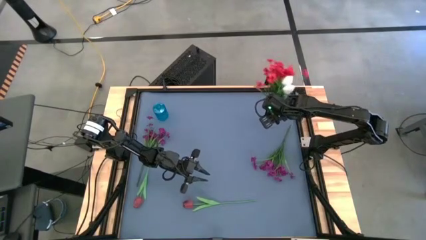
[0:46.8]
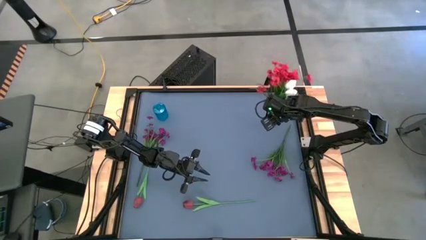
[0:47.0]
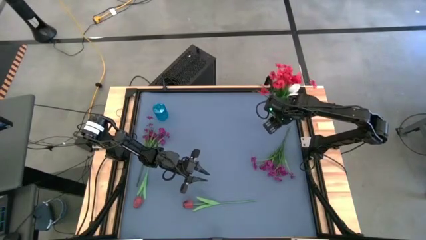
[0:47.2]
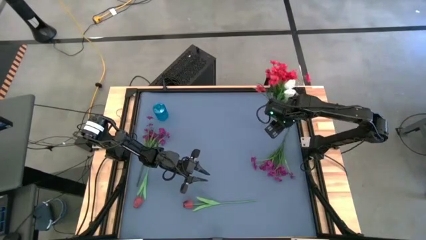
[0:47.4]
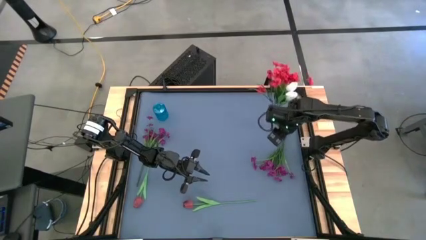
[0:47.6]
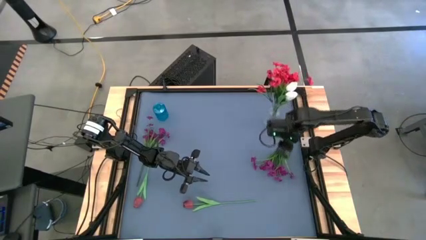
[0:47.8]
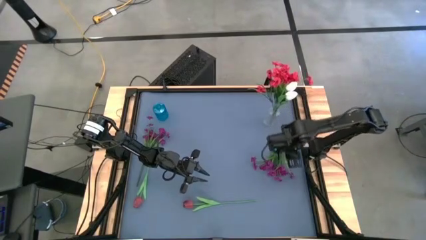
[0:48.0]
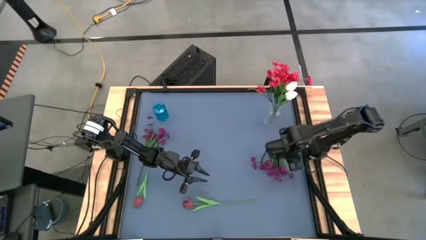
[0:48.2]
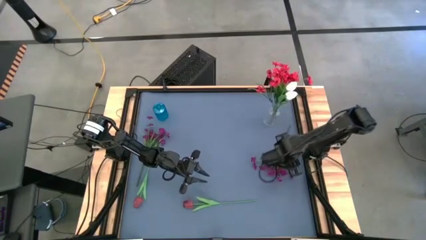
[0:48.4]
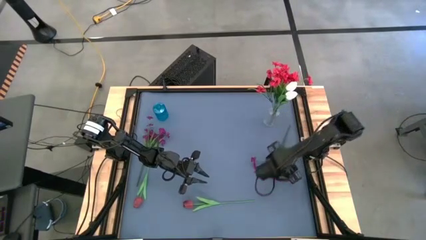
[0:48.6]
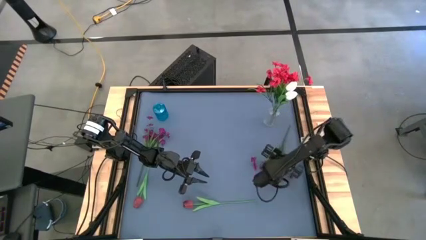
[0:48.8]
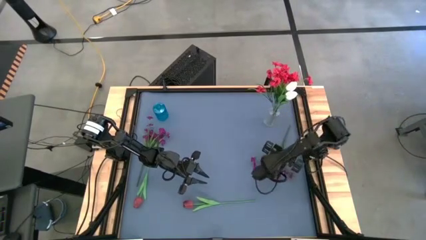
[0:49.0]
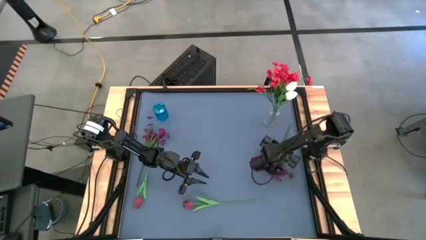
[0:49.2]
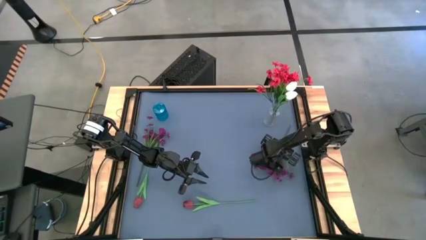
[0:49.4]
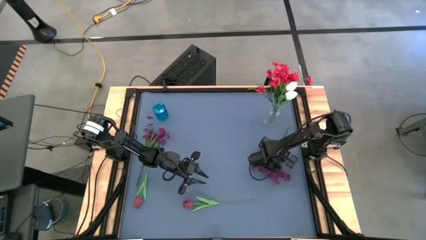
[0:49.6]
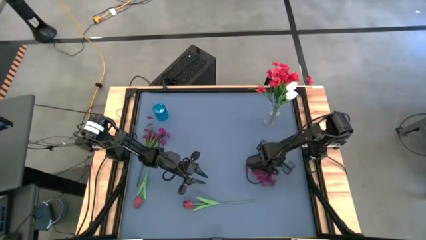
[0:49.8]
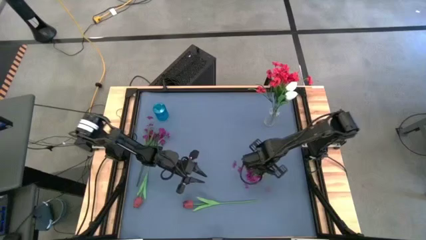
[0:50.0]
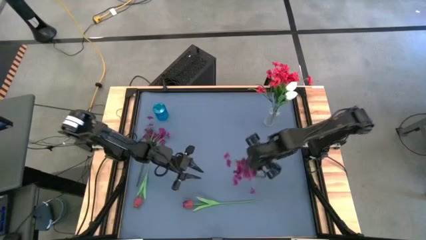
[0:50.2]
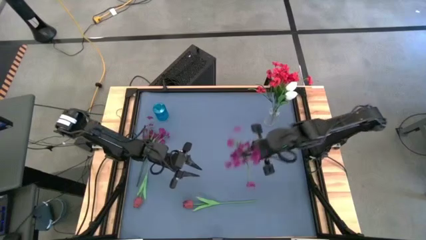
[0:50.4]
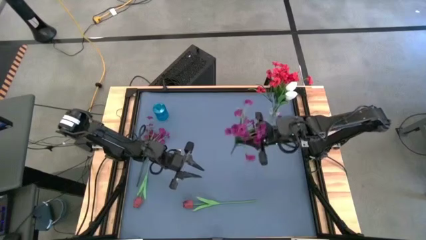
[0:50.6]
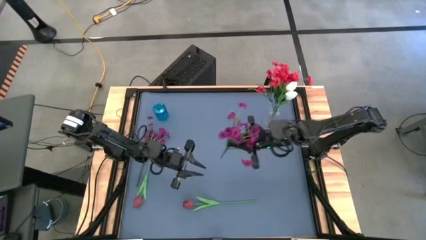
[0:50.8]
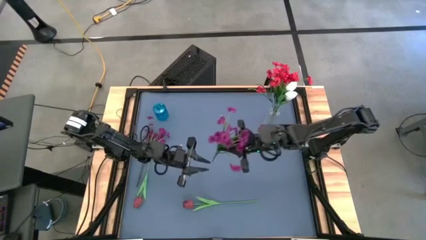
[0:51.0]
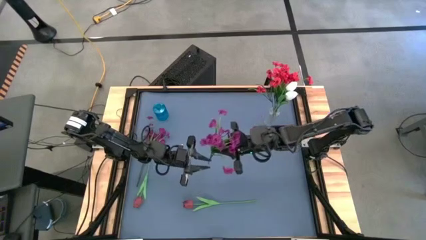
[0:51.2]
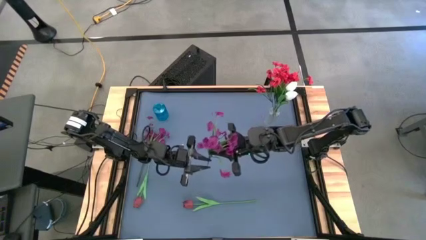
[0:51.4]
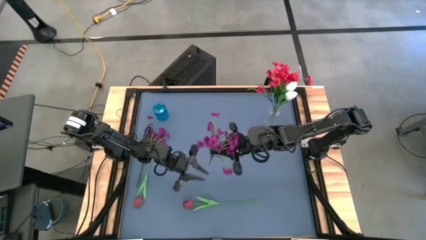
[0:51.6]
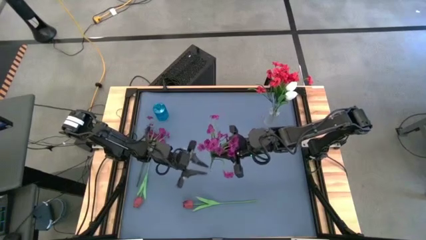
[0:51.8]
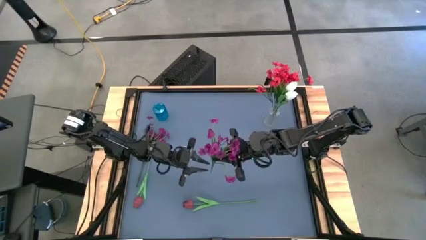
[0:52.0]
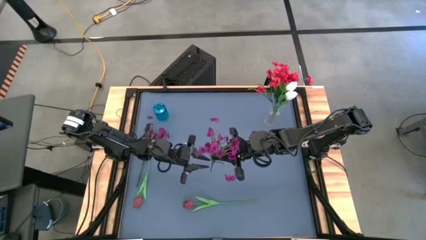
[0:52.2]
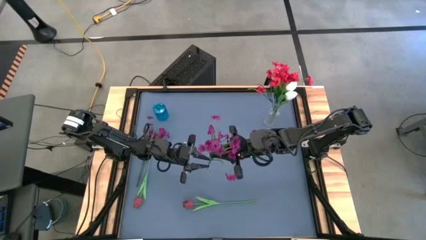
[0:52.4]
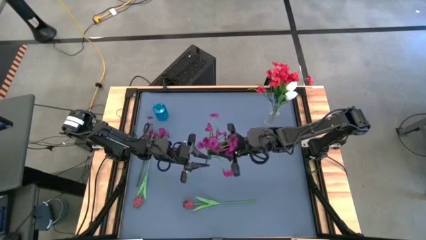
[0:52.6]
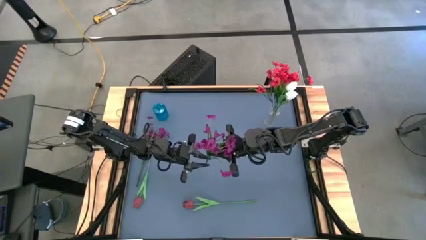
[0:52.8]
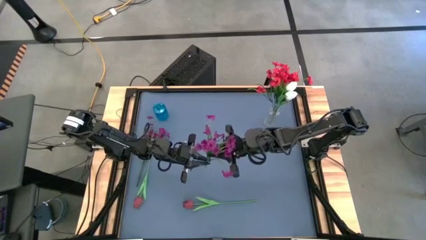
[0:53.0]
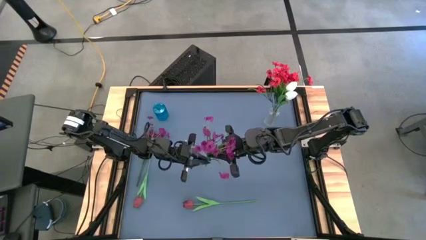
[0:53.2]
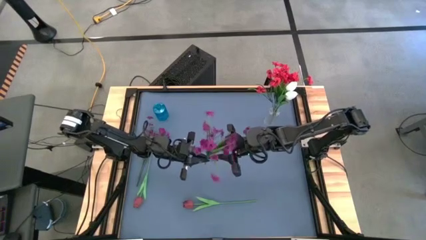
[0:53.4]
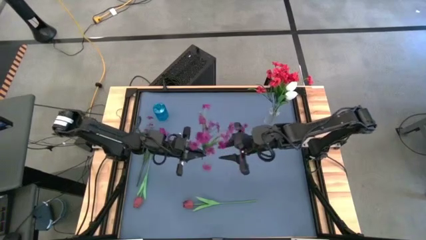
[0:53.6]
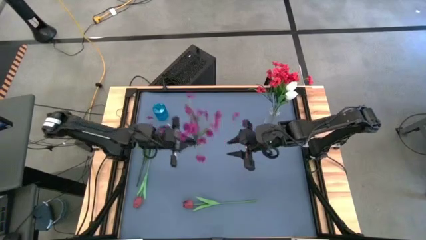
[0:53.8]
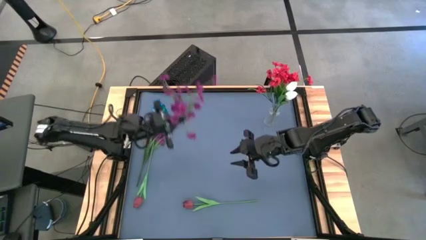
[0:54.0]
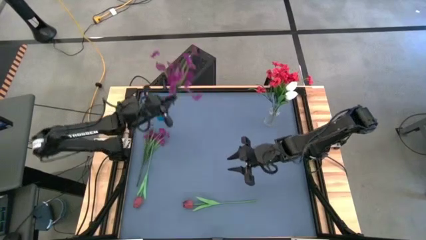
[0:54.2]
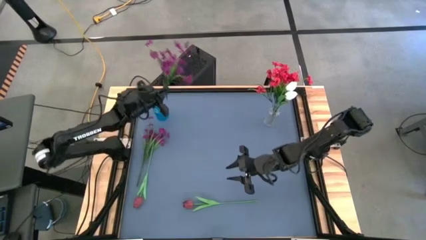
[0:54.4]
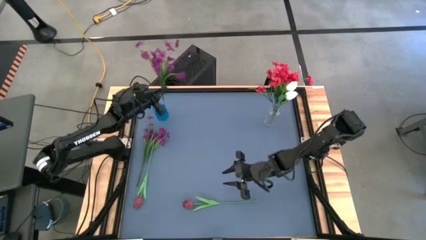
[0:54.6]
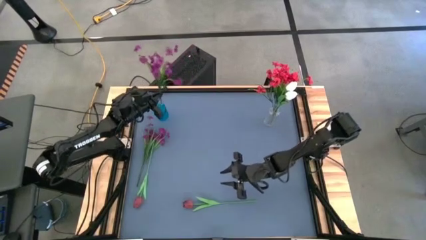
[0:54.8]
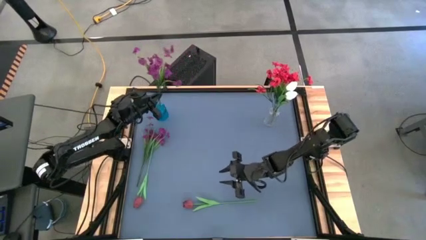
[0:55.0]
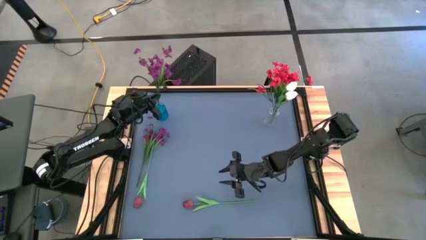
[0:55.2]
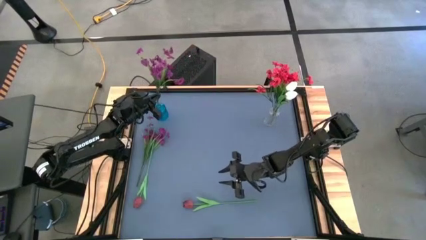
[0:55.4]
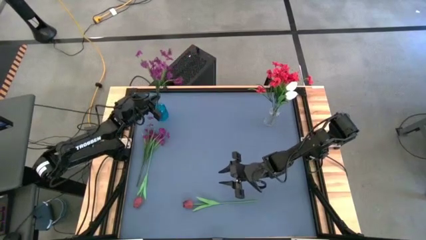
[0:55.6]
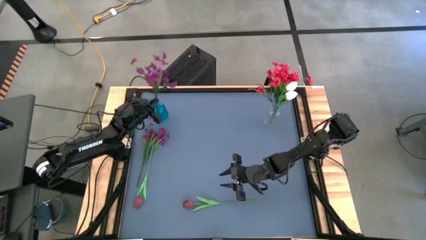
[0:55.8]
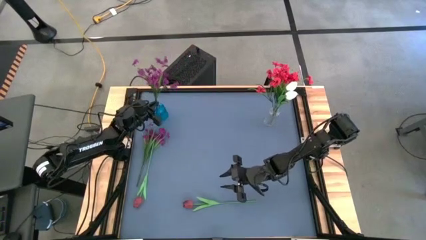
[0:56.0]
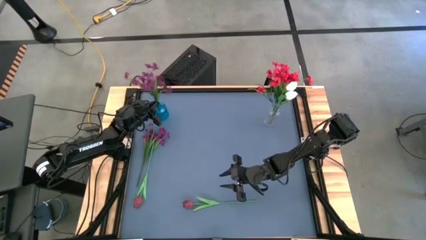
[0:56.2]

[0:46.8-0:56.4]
Task: Sort flowers into vase by color
Put the right violet flowers into the blue vase

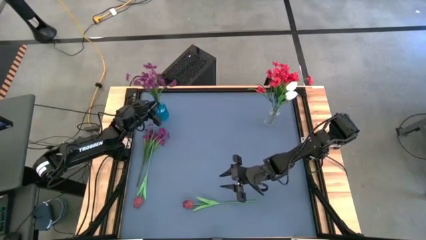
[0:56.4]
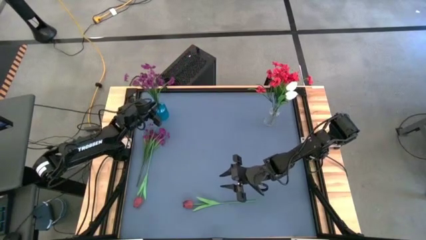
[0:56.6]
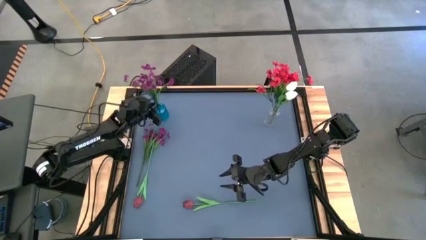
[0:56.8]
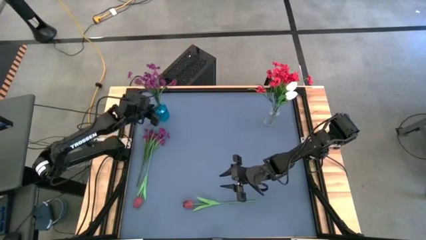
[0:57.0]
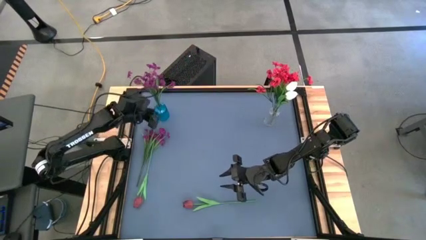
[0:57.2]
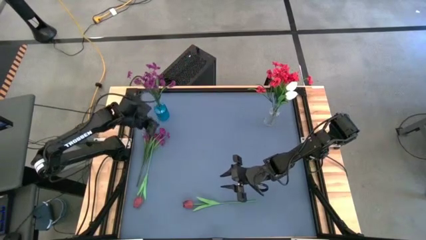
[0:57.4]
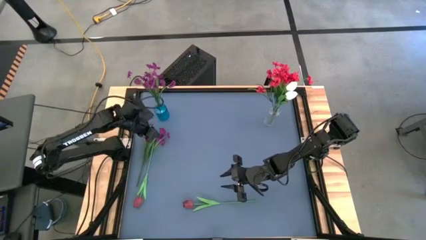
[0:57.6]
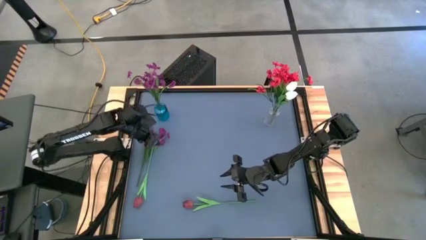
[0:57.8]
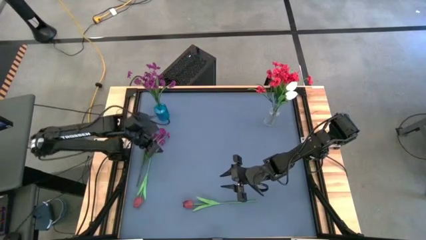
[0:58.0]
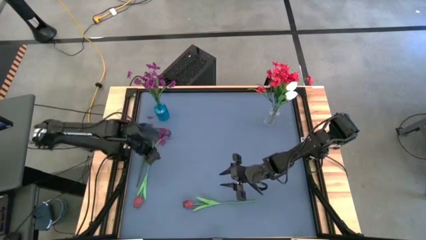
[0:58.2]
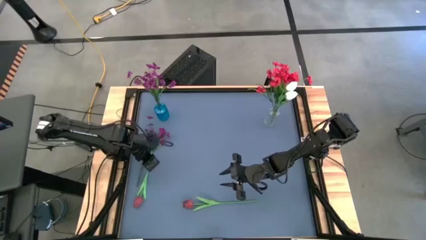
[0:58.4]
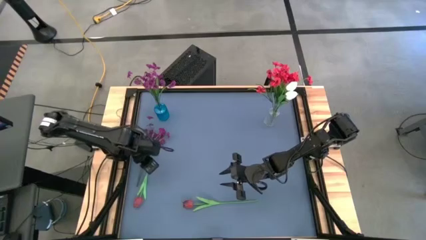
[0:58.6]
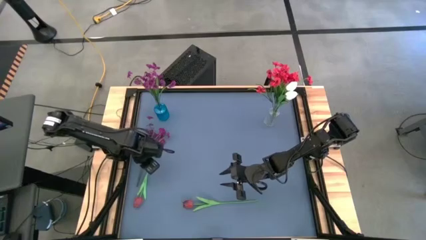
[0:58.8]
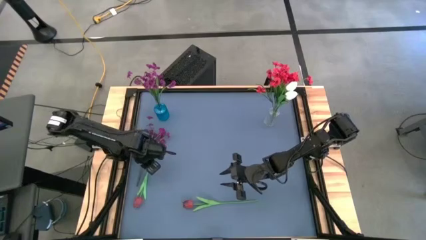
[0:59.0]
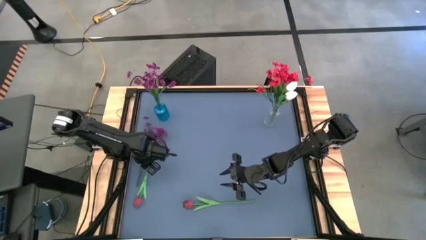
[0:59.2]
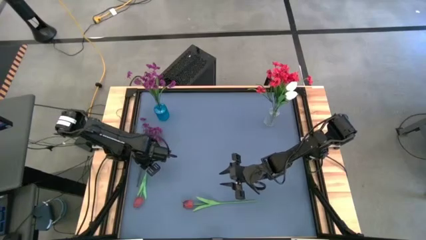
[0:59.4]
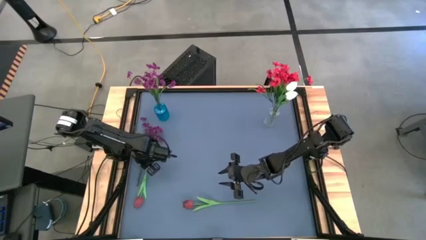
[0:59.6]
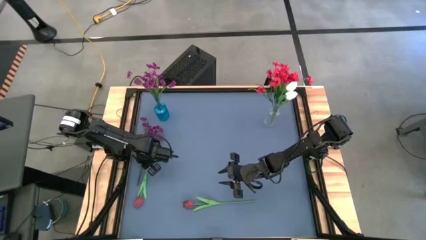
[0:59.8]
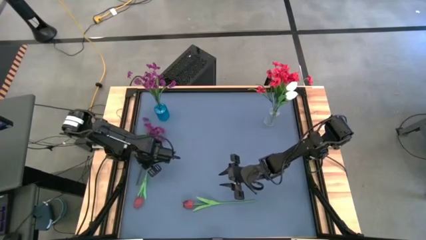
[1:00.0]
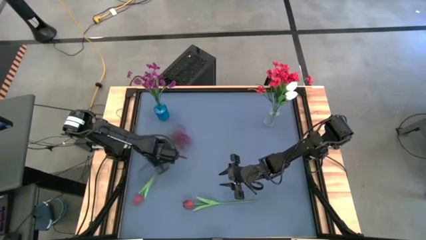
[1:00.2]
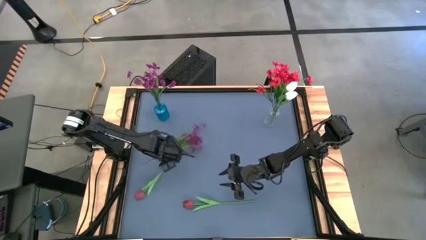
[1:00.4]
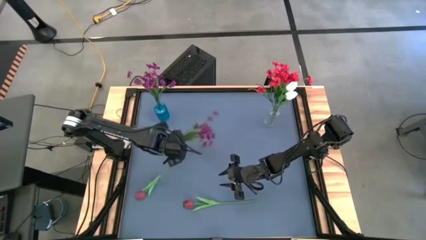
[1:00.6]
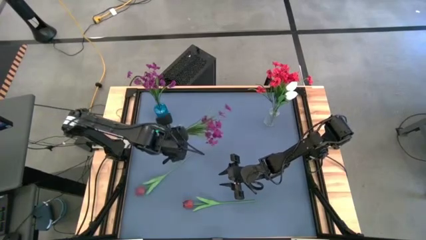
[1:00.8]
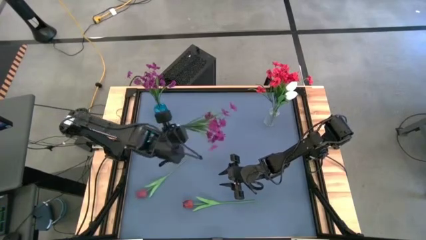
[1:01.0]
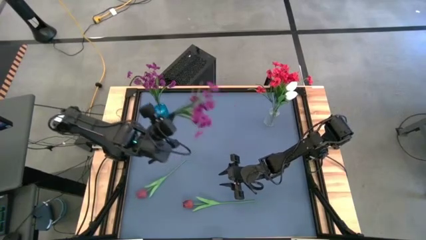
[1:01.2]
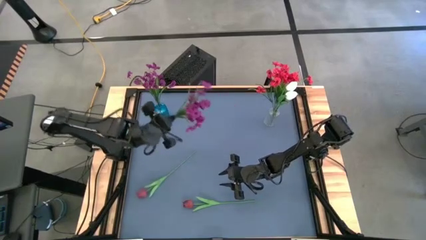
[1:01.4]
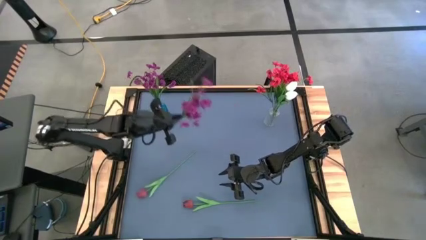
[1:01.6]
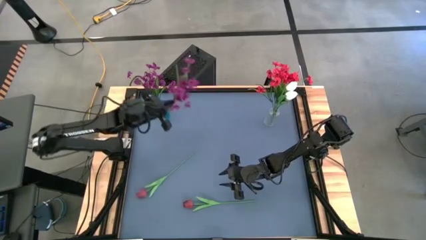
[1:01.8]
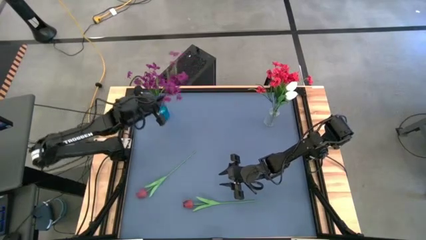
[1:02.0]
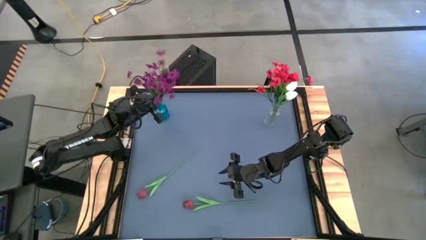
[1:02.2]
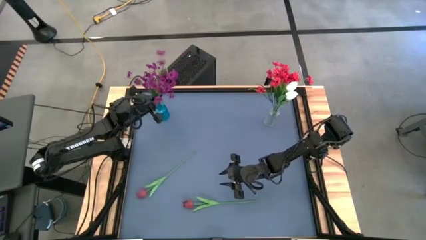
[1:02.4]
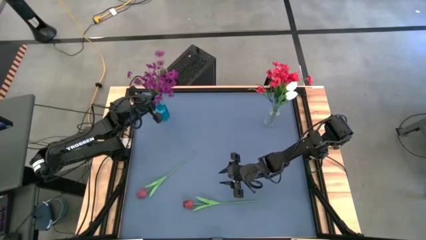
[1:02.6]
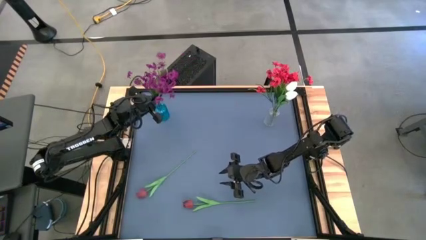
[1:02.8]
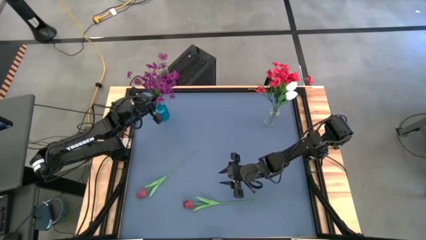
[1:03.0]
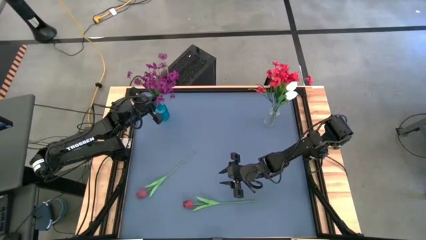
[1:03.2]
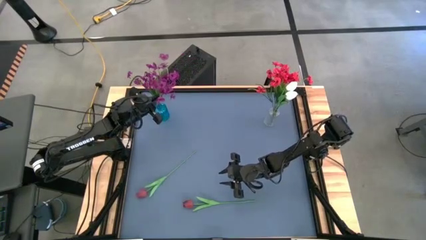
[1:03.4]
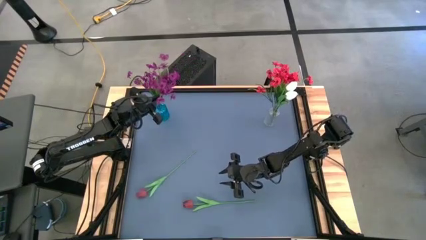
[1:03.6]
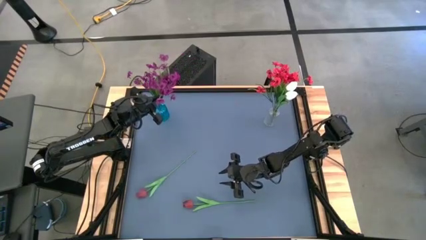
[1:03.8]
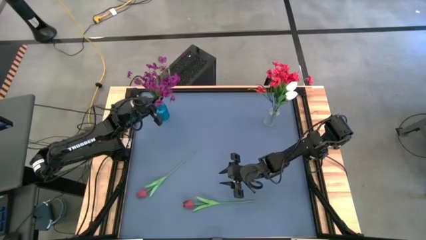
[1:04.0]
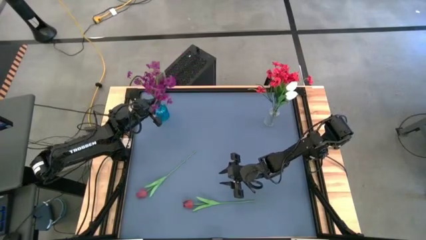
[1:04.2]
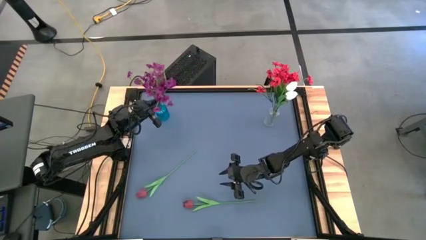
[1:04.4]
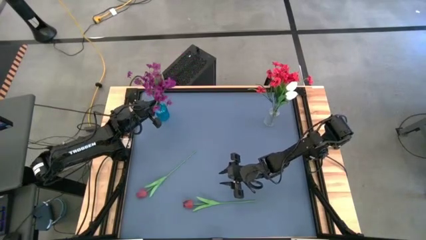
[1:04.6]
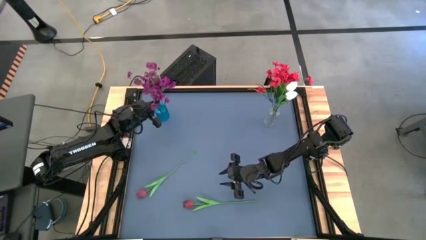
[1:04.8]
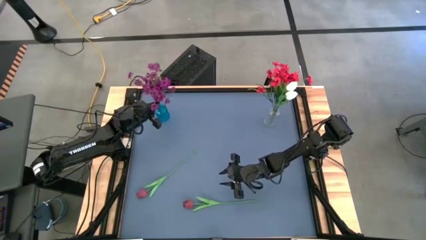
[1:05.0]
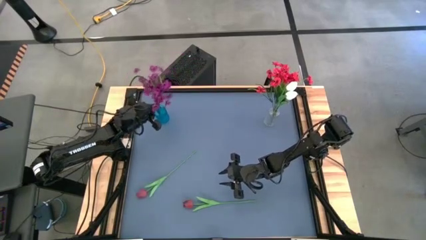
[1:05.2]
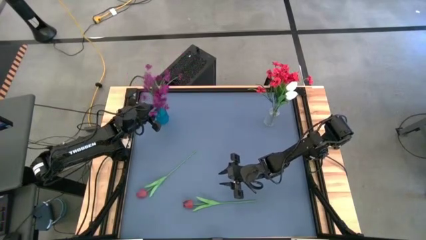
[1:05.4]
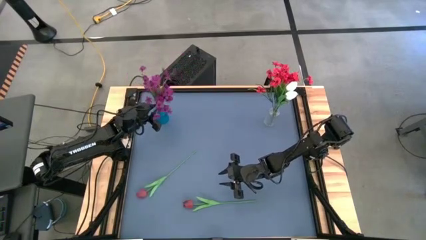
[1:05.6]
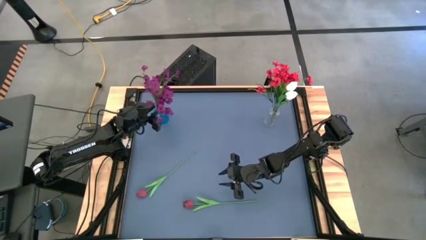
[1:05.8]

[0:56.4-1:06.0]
Put the violet flowers into the blue vase
